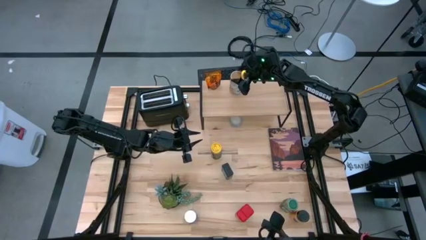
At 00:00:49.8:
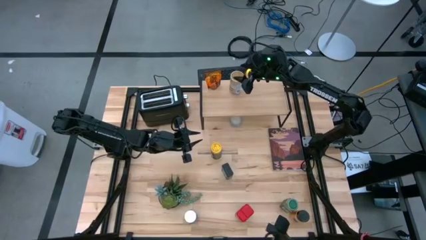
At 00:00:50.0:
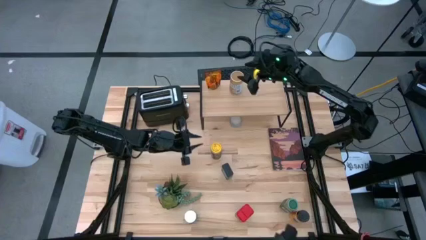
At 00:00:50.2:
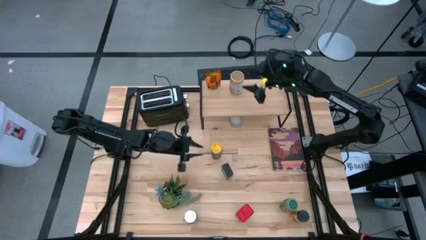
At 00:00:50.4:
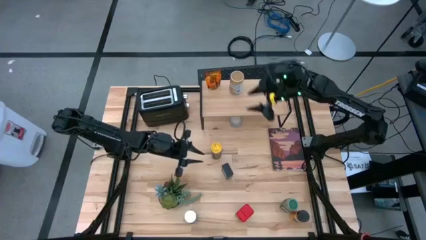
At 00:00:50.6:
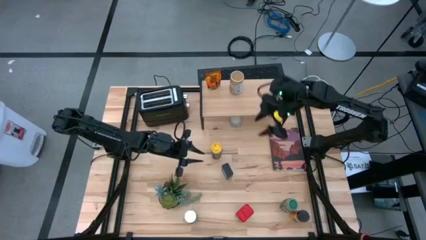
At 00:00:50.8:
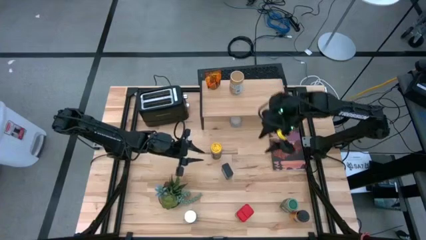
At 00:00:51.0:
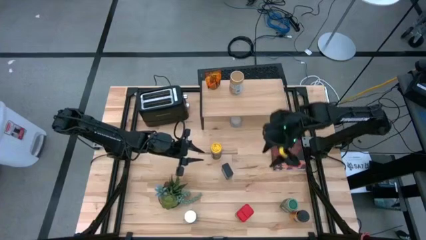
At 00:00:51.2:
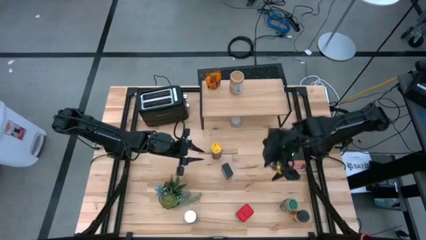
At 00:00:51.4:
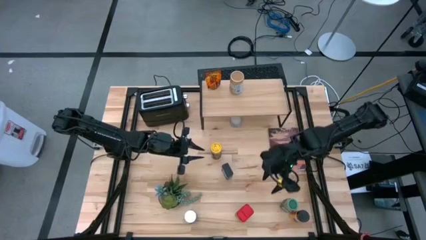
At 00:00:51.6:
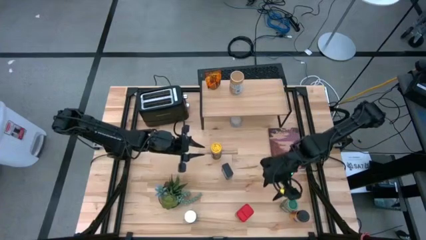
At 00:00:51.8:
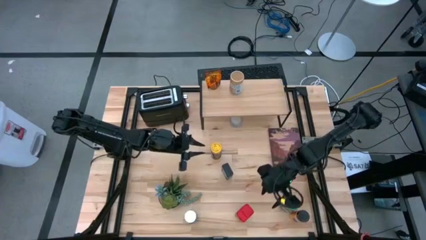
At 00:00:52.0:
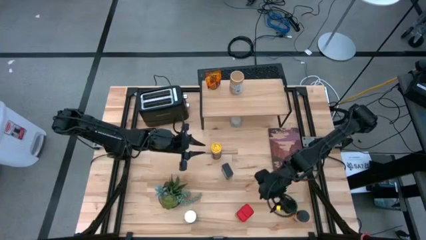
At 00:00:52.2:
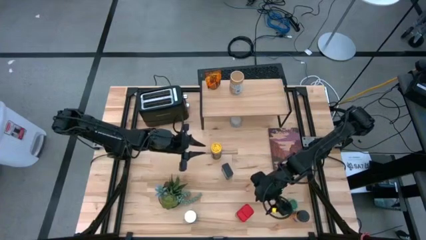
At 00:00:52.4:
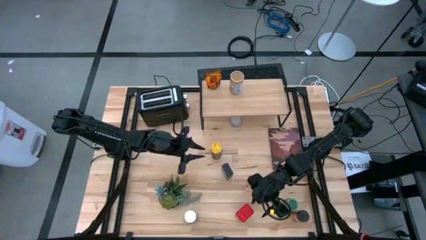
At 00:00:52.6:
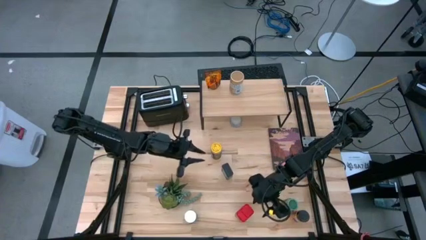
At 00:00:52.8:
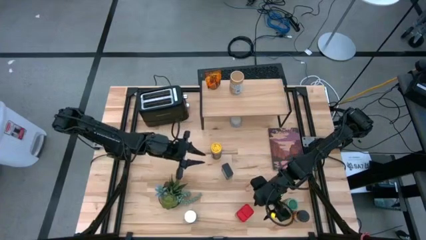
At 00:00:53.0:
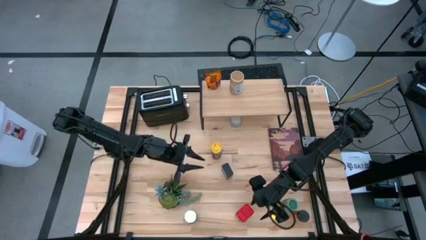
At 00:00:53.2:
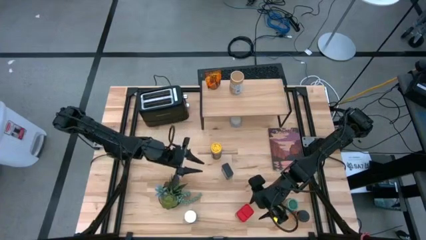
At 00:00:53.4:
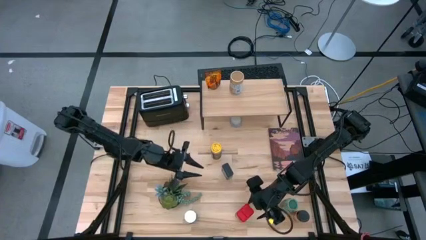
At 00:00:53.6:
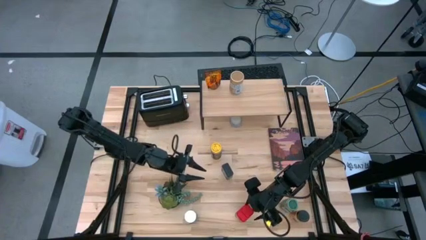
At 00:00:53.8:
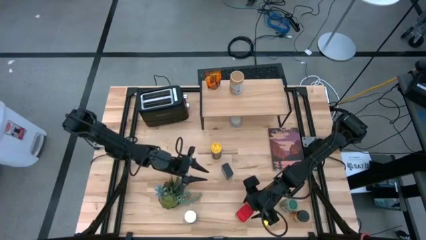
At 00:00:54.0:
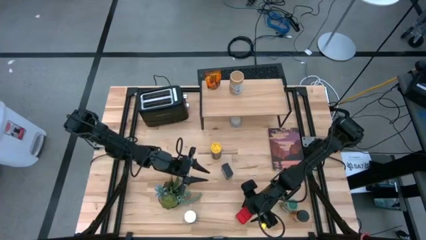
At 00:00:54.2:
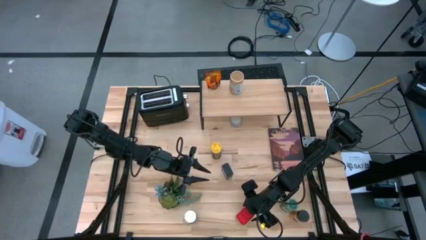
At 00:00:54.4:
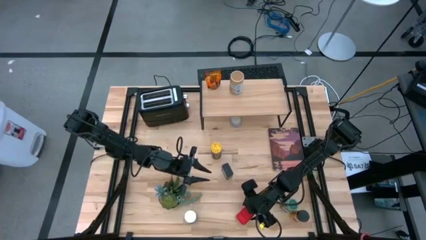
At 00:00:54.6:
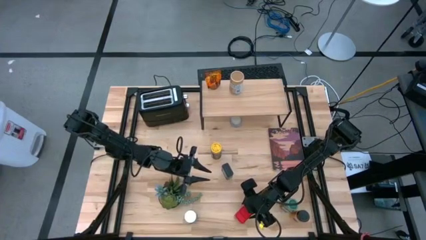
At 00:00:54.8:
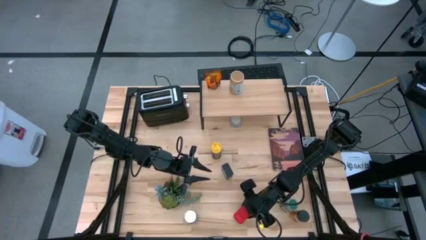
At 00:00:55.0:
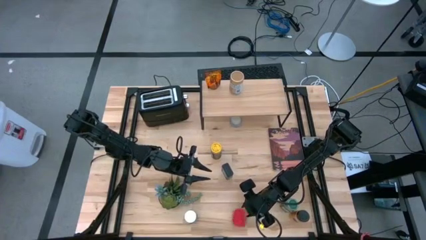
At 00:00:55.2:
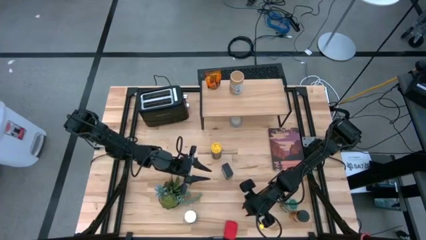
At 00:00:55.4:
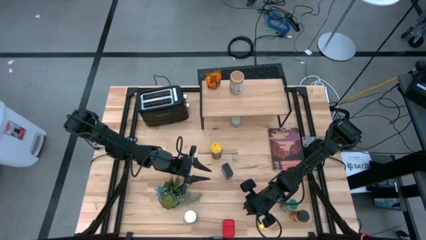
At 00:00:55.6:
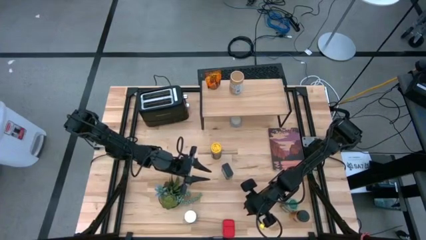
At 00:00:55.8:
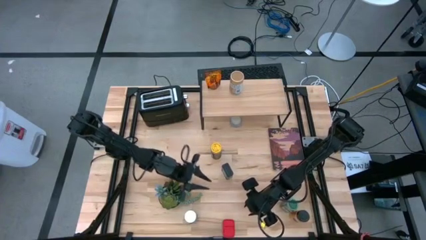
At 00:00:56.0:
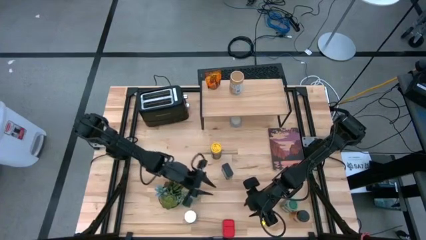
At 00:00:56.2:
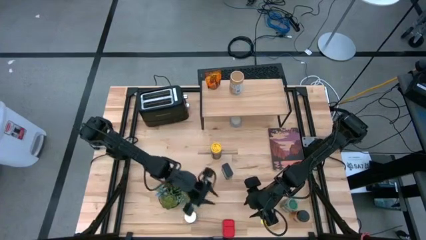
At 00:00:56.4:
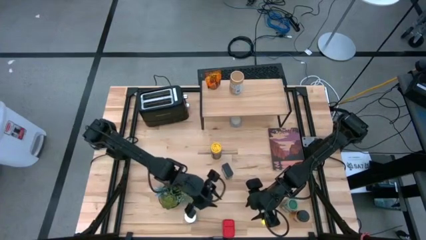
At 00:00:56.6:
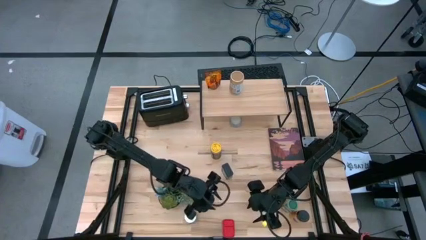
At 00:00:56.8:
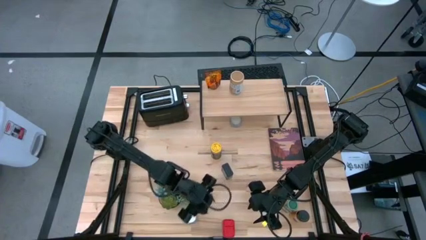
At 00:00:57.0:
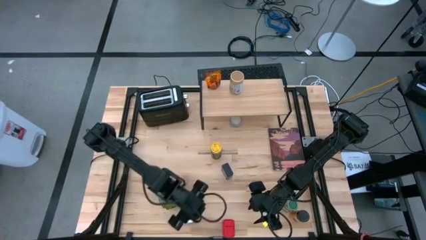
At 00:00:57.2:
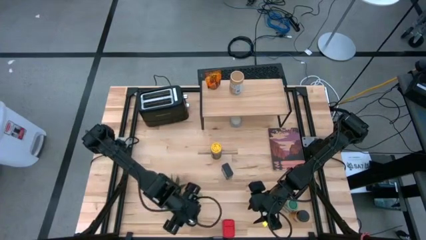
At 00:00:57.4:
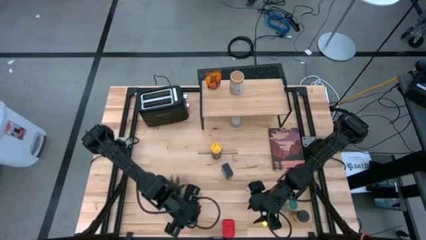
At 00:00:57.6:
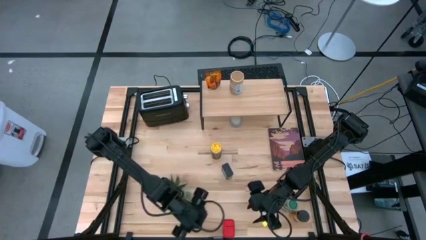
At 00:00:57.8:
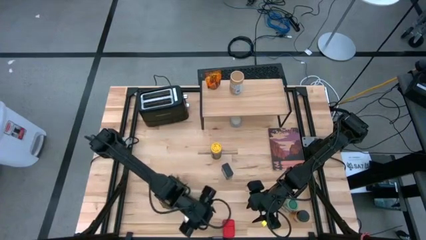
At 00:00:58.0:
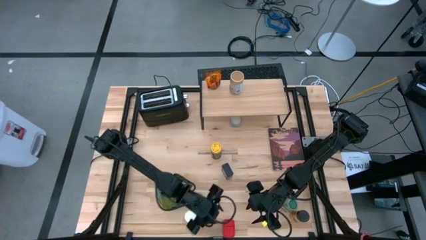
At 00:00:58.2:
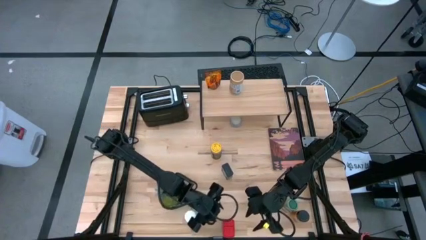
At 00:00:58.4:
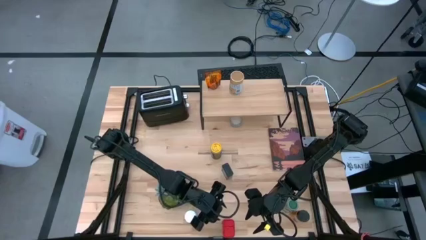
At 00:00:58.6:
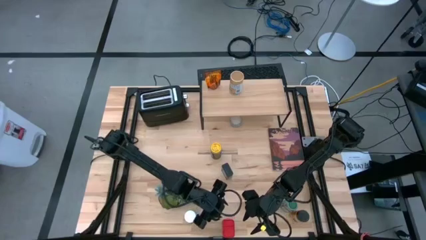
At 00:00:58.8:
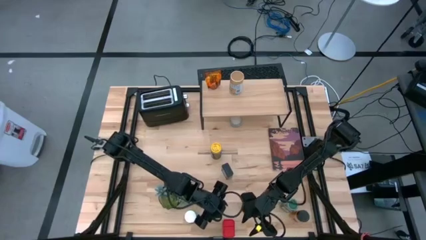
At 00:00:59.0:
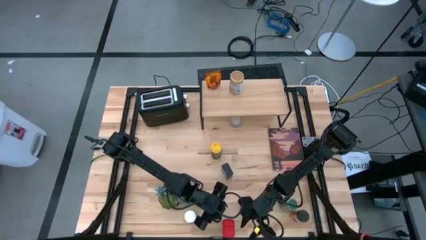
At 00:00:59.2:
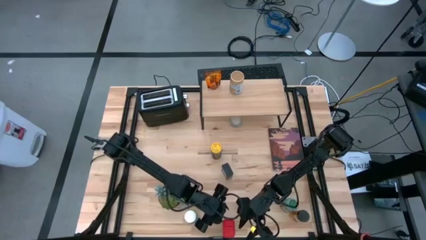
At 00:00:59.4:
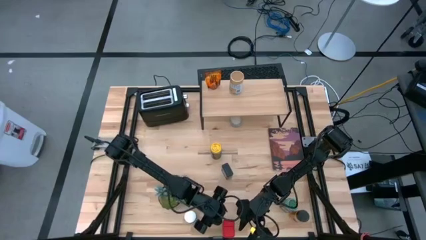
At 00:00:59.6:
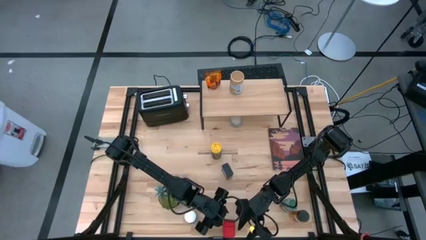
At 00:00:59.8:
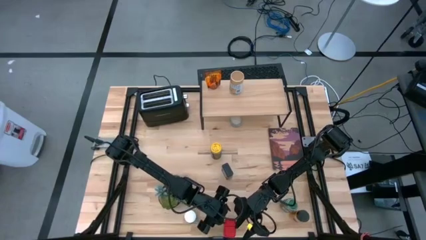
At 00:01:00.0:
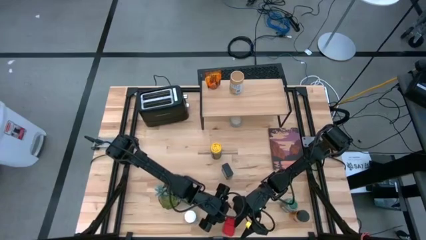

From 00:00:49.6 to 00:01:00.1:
Task: Shelf spices
Put the red seasoning can on the shelf

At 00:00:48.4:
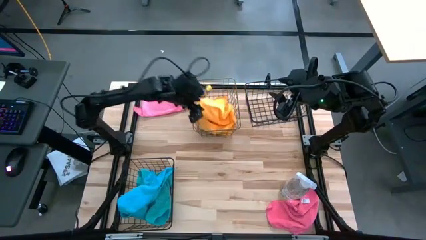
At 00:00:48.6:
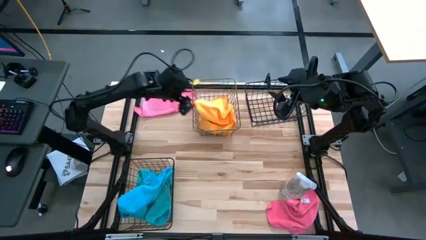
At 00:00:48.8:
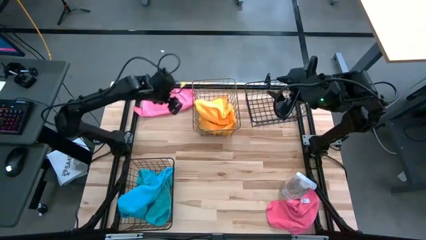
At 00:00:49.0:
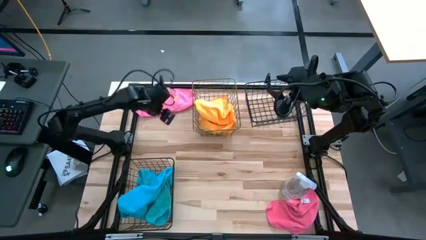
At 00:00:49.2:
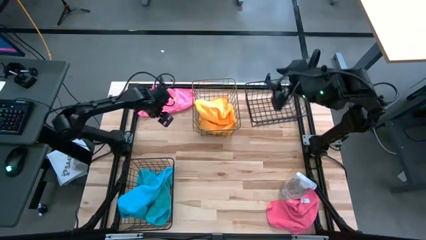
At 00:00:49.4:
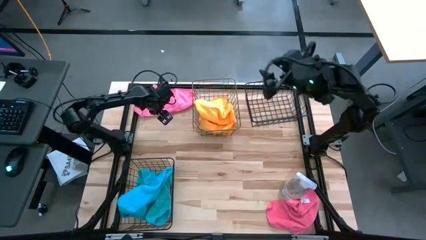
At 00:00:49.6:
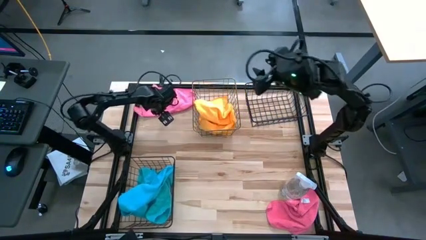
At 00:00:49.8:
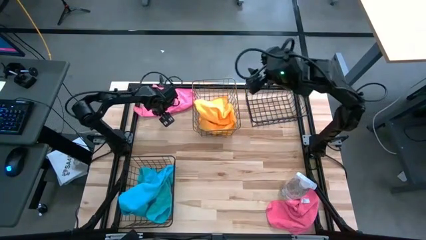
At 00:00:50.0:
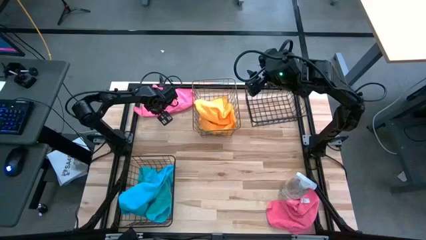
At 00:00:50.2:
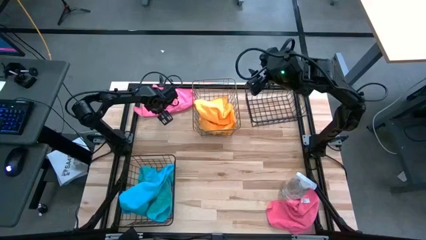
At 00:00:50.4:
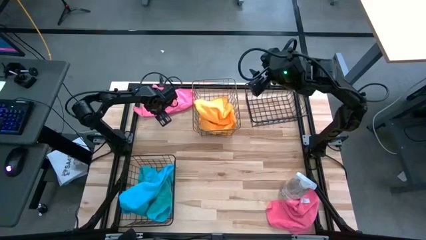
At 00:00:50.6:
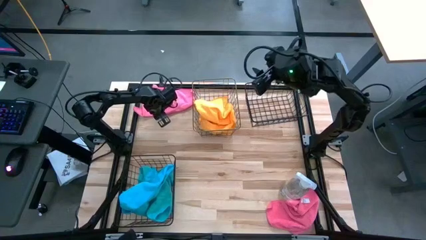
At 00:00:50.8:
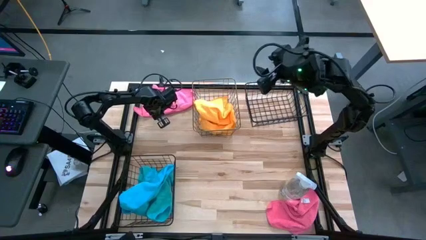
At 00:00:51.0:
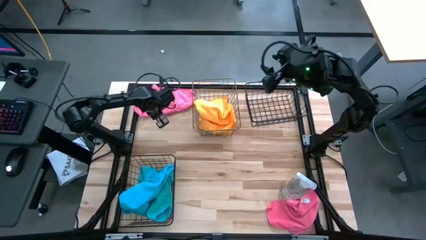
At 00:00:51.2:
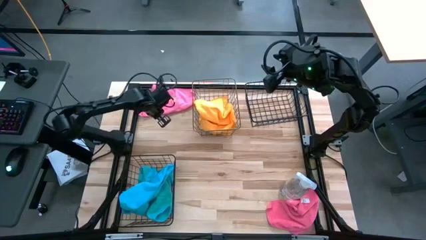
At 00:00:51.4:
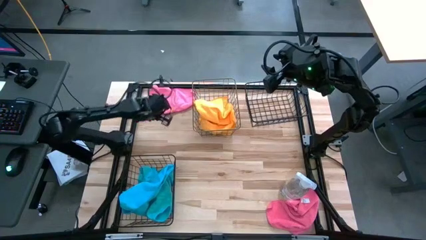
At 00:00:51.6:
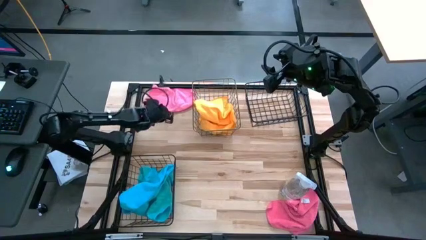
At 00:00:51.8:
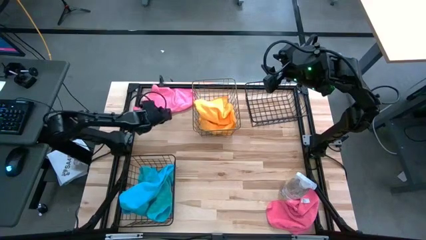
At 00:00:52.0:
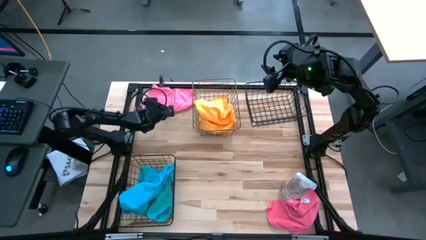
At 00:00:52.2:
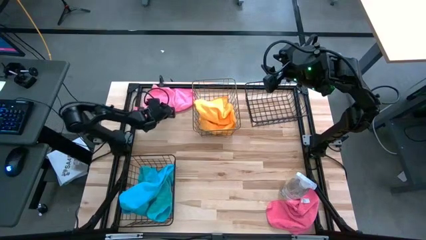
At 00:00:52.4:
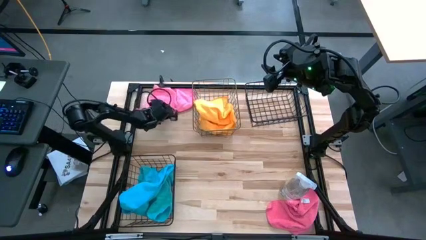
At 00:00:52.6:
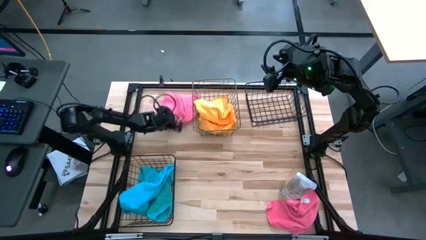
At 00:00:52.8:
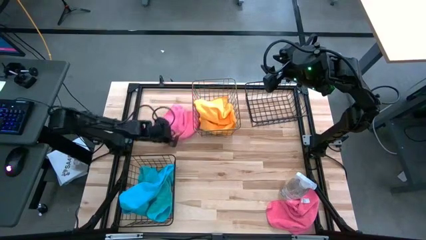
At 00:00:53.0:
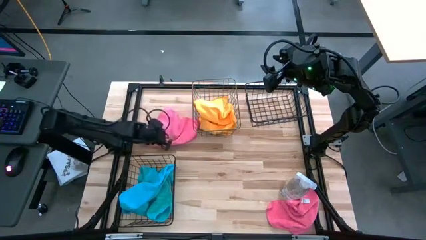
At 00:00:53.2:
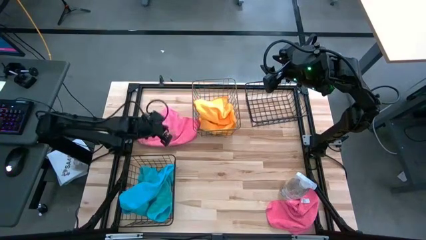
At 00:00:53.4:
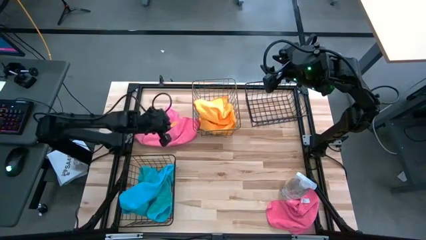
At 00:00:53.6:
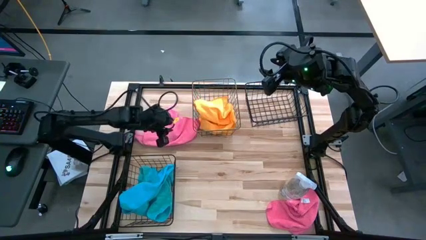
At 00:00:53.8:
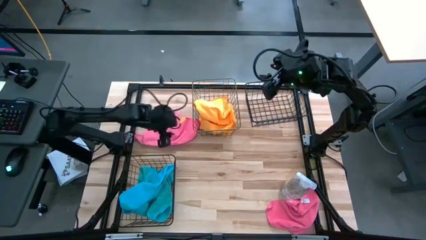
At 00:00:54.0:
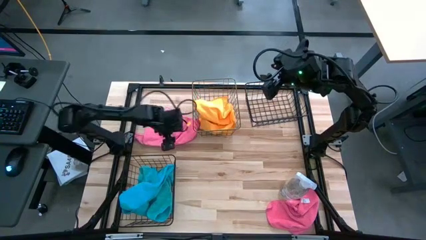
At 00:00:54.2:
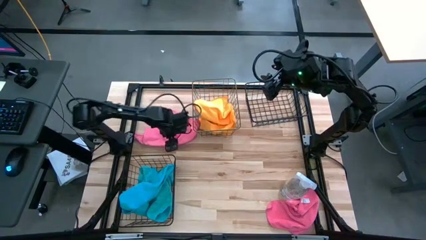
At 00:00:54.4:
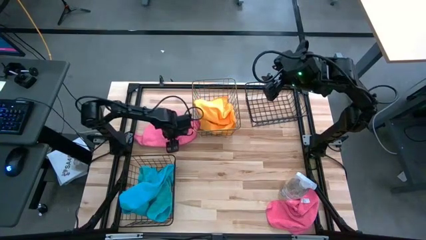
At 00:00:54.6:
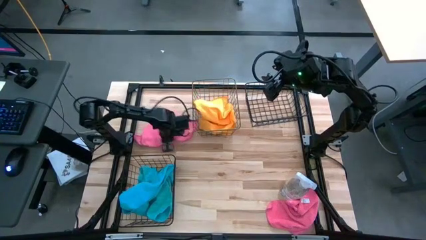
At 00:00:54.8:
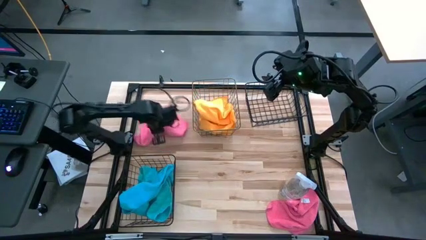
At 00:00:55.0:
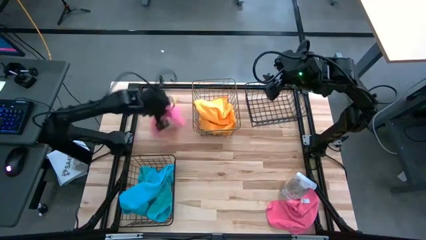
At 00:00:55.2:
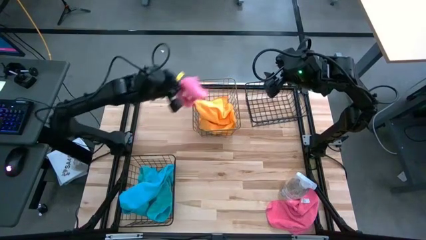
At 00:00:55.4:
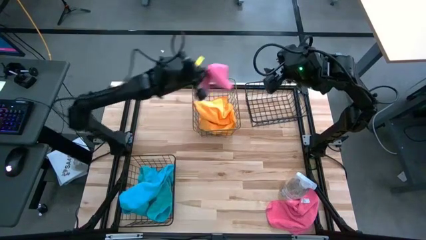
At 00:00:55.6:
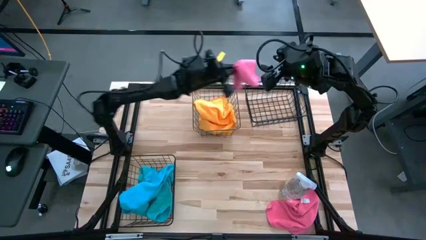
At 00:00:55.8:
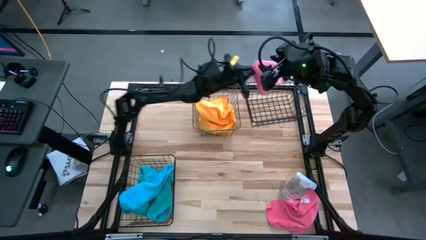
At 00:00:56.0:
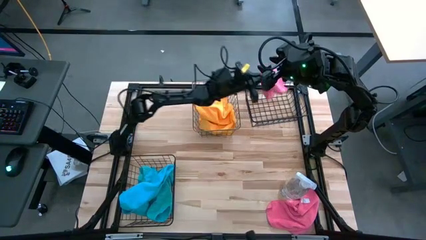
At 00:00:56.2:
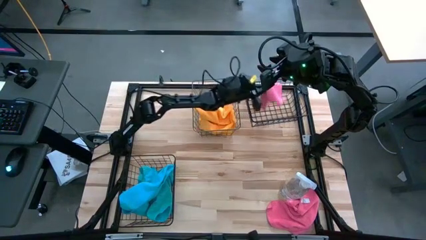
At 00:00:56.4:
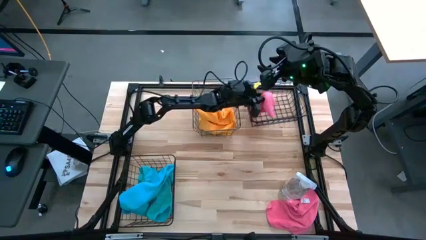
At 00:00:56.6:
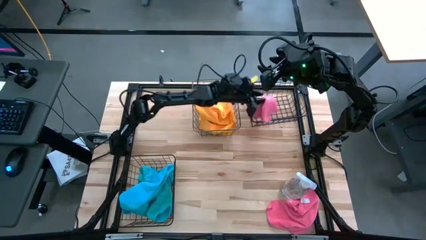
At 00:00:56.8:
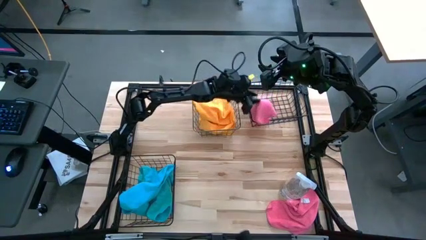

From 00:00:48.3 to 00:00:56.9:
Task: Sort microfiber towel by color & place in baskets
Put the top pink towel into the top black wire basket
